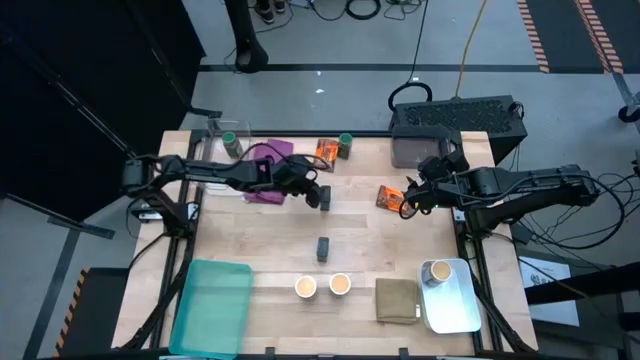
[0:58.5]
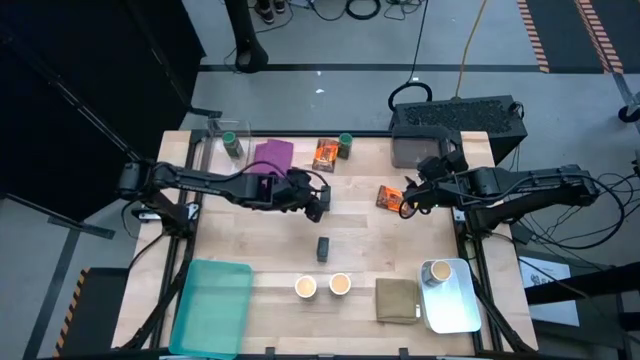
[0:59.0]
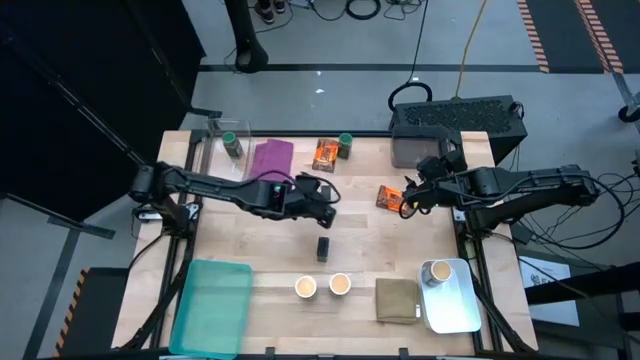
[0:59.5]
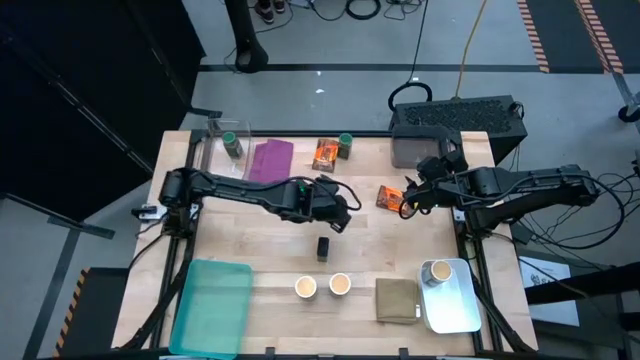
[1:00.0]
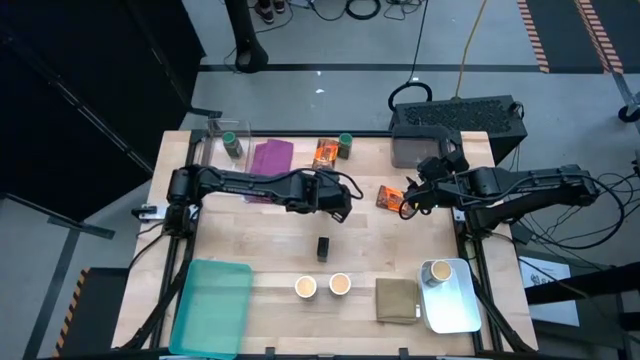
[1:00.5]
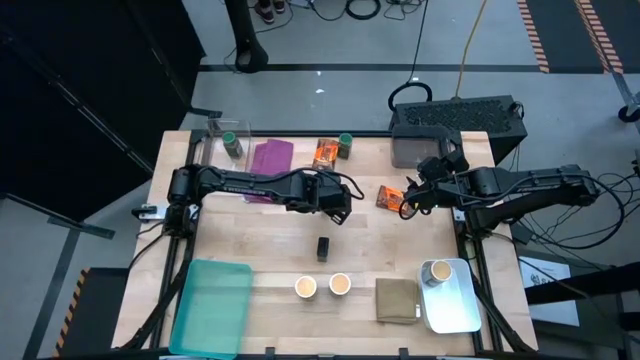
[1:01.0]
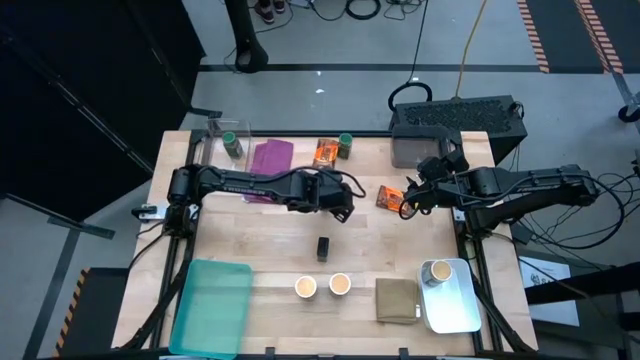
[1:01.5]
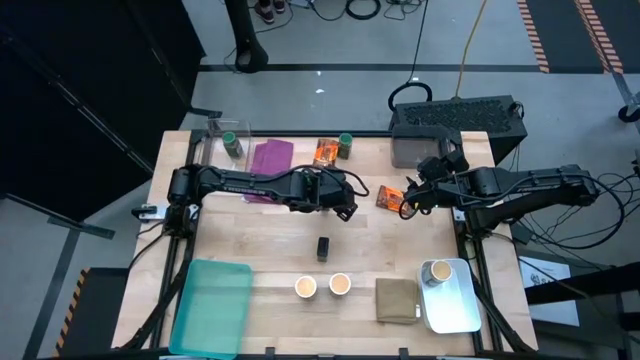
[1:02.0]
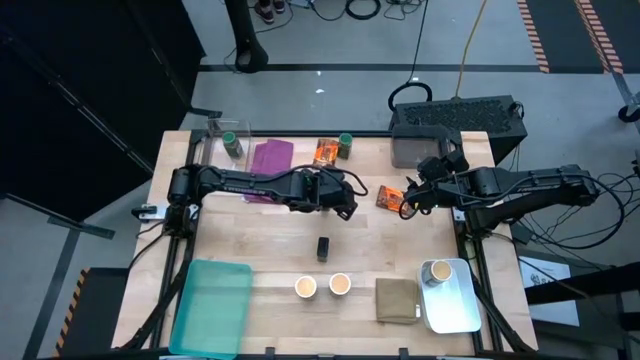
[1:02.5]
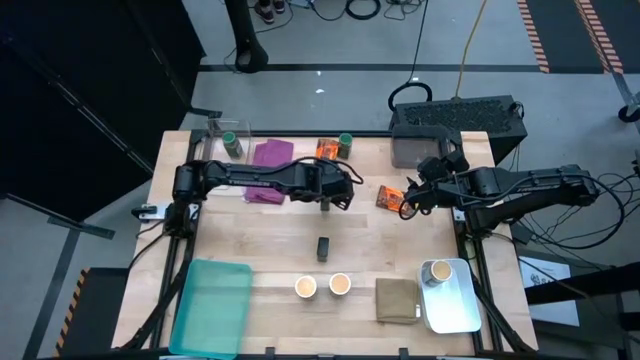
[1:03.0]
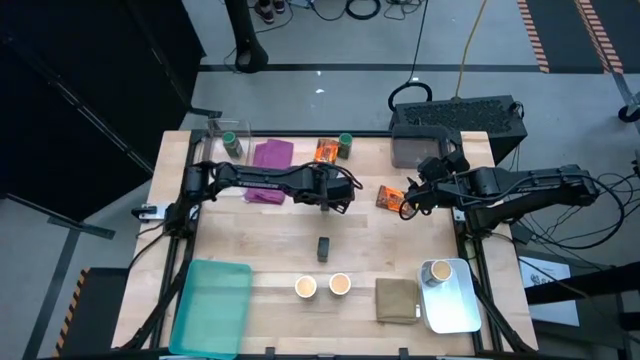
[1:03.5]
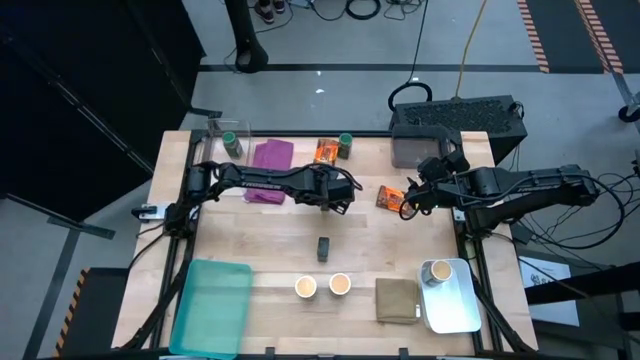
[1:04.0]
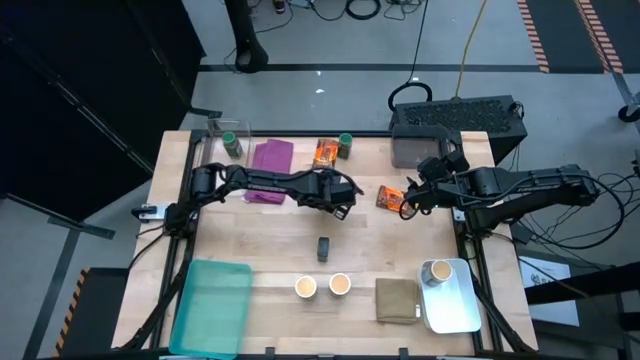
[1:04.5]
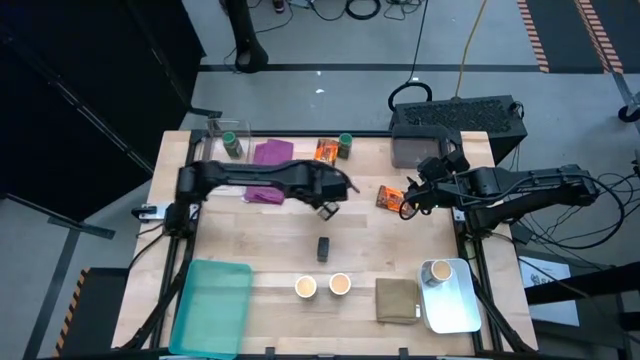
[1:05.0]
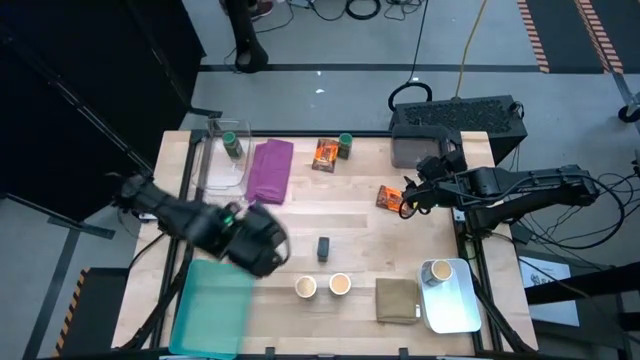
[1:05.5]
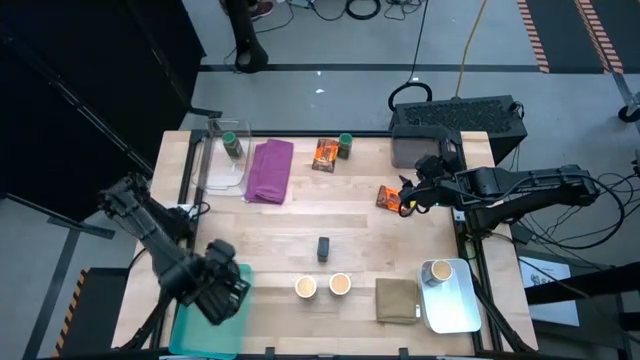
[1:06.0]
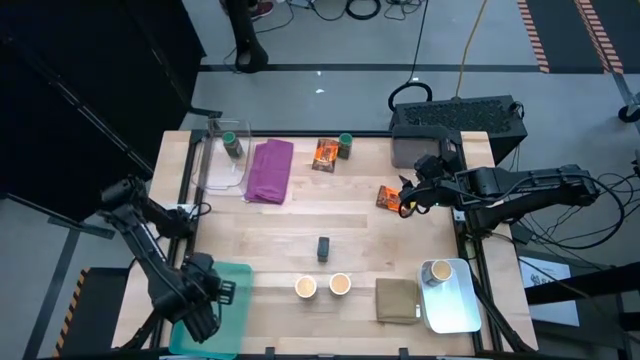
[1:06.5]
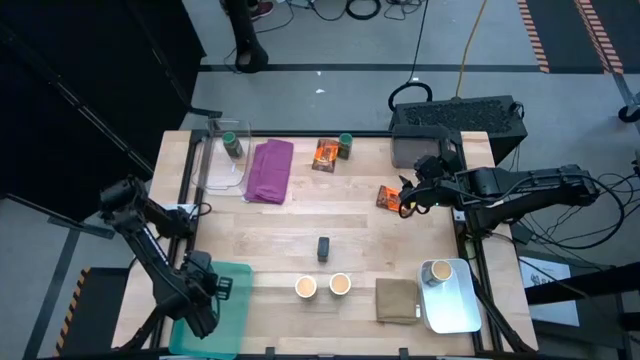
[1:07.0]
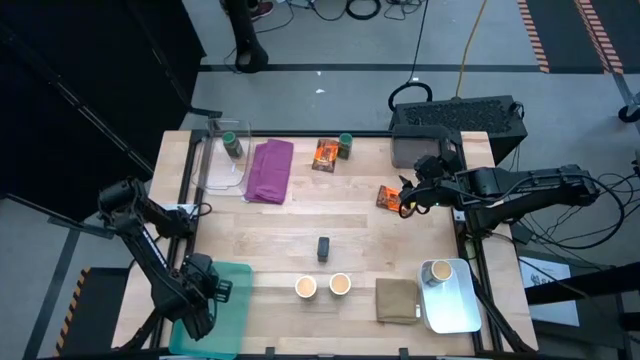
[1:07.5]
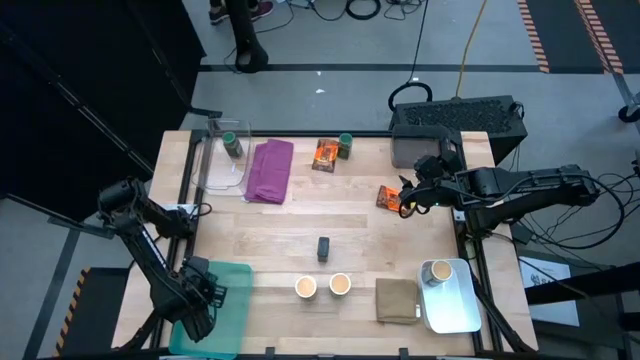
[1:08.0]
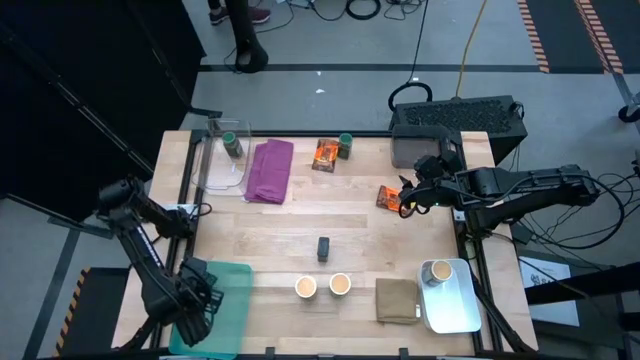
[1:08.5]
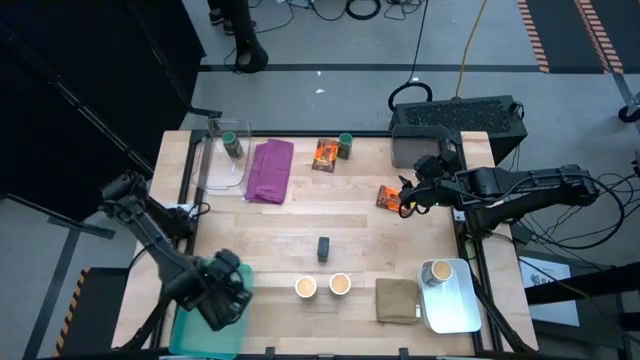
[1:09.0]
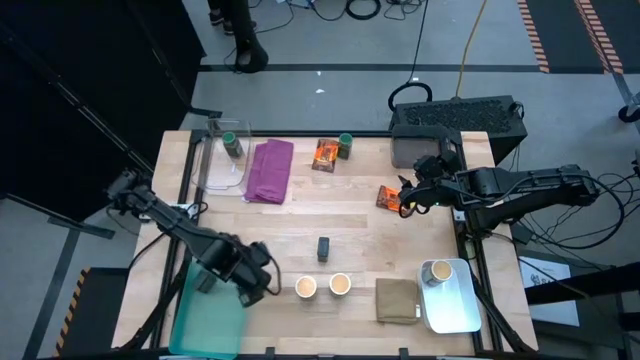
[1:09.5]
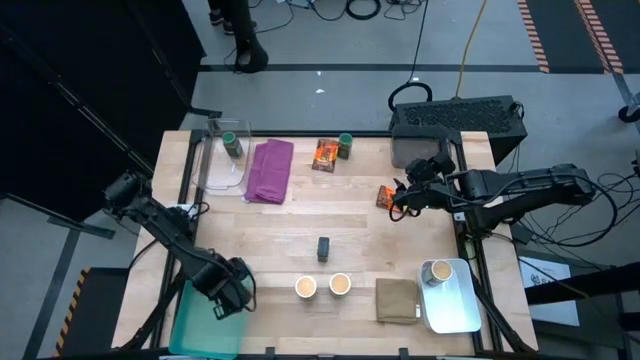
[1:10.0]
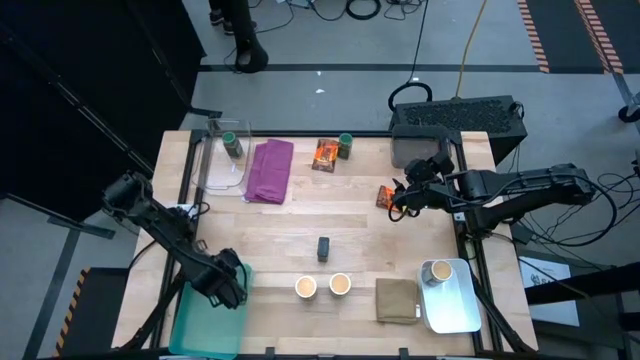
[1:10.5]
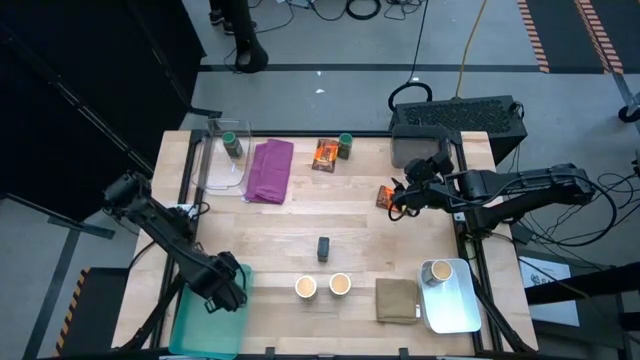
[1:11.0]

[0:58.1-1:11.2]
Task: Sort spices by type
Put the top black seasoning can into the light blue bin

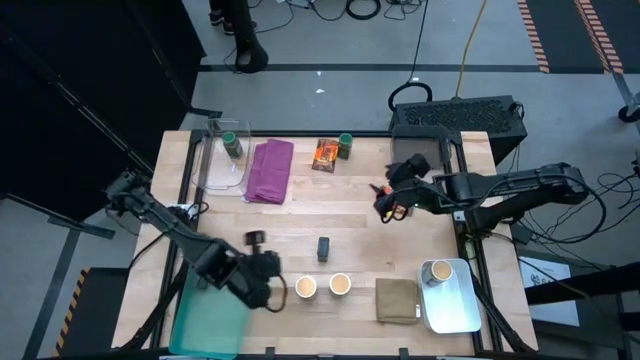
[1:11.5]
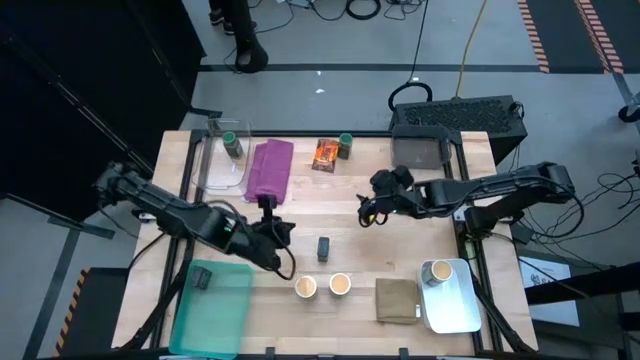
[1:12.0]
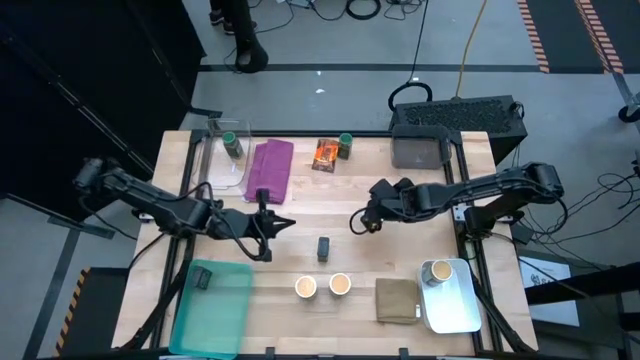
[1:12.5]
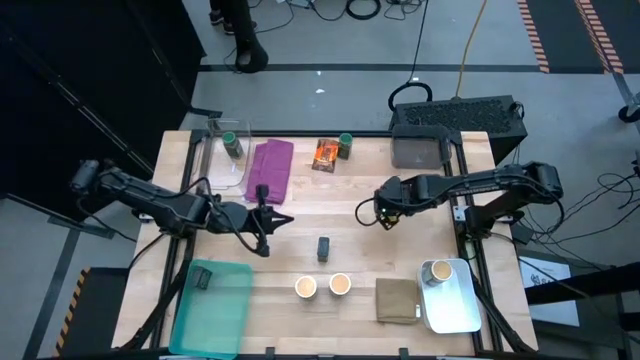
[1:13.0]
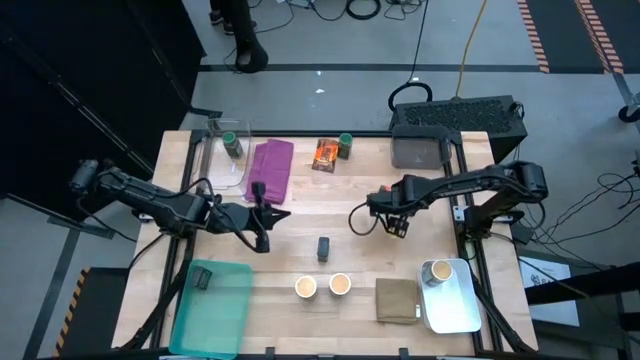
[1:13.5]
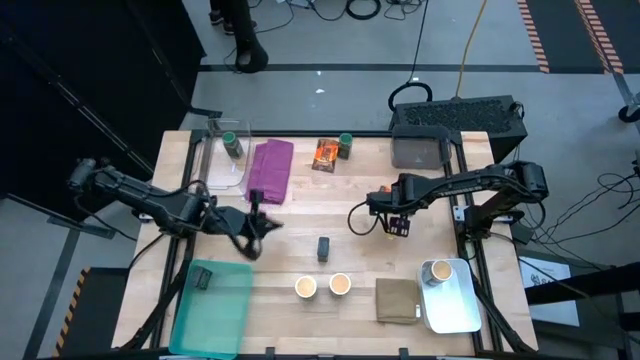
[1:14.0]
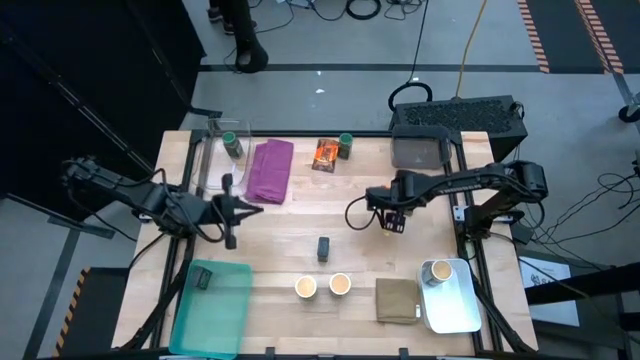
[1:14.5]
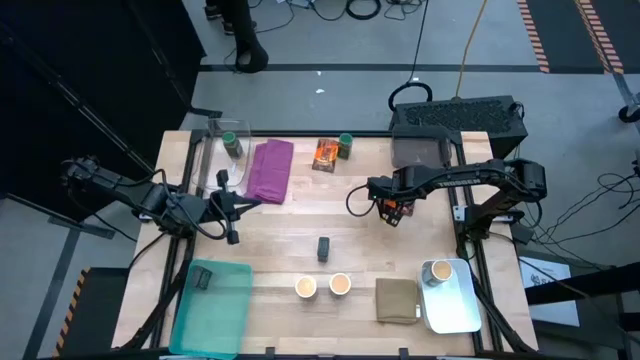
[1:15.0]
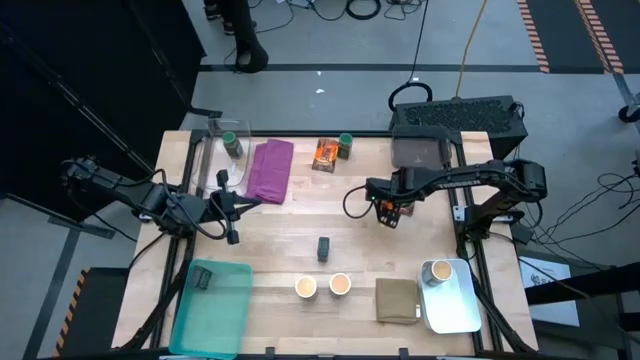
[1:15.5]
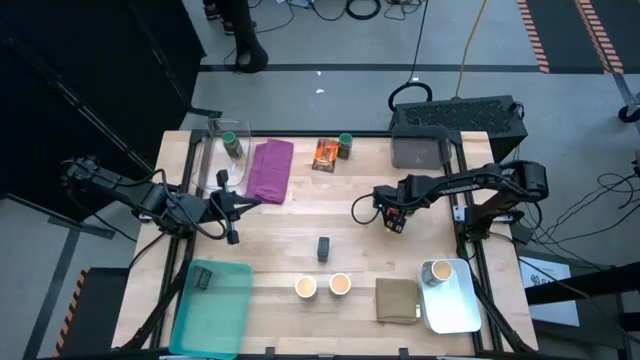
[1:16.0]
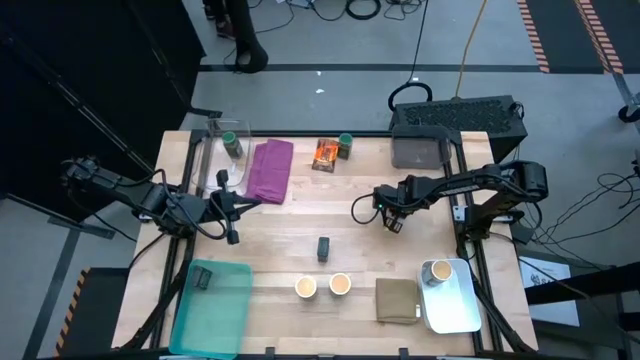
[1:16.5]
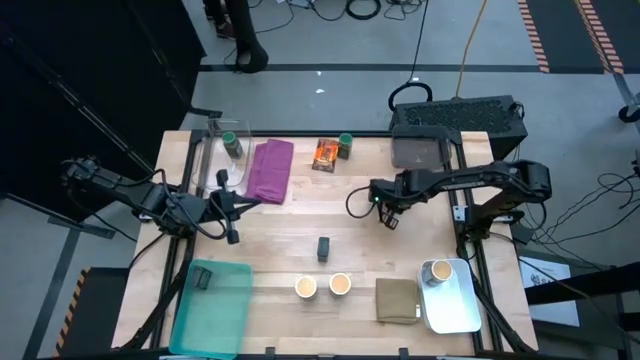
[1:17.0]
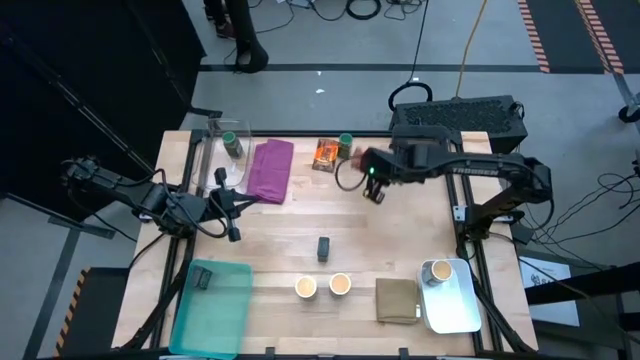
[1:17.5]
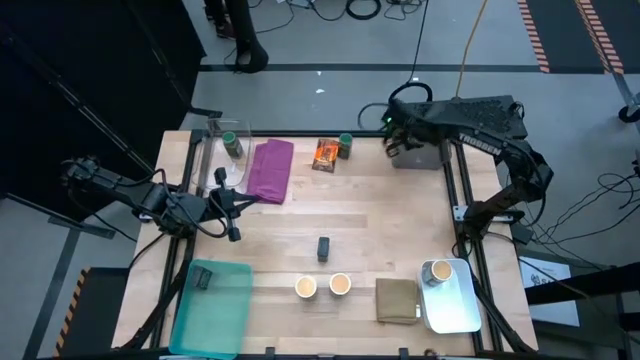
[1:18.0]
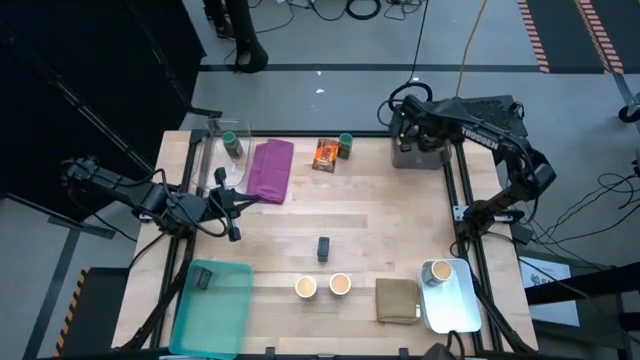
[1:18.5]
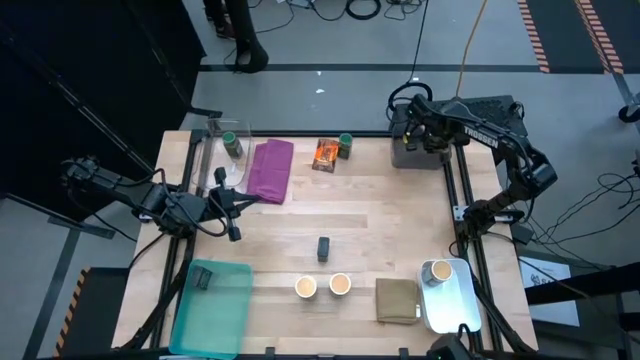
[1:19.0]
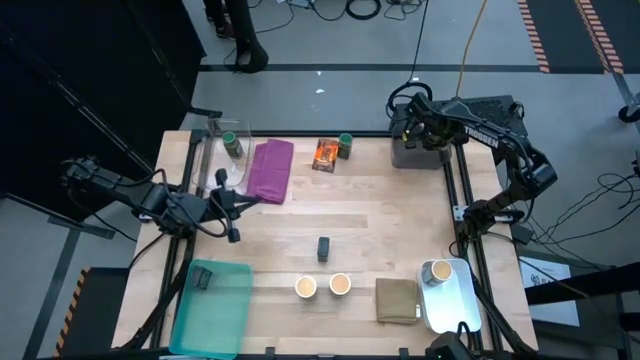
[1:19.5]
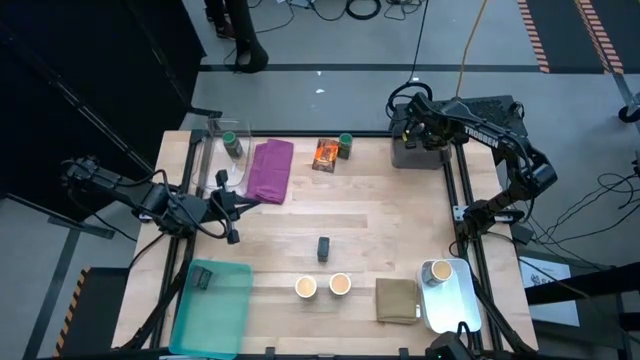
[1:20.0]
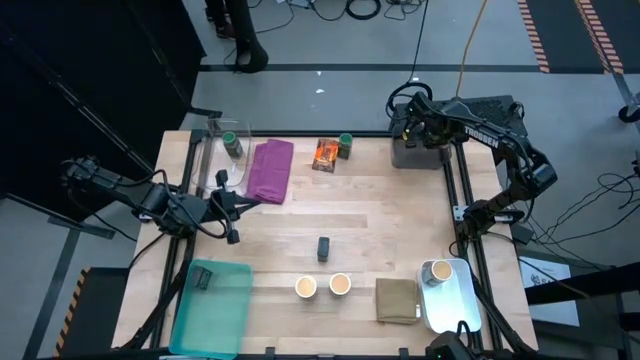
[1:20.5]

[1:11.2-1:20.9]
Put the bottom orange seasoning bag into the black bin
